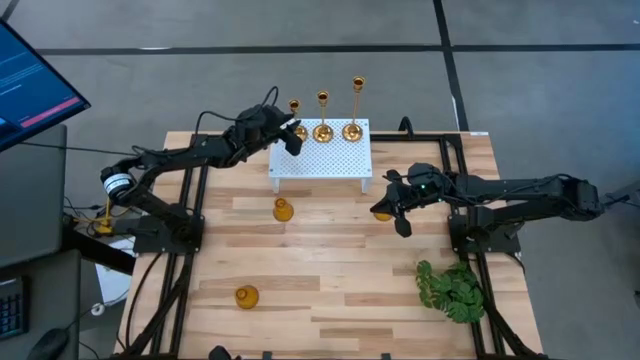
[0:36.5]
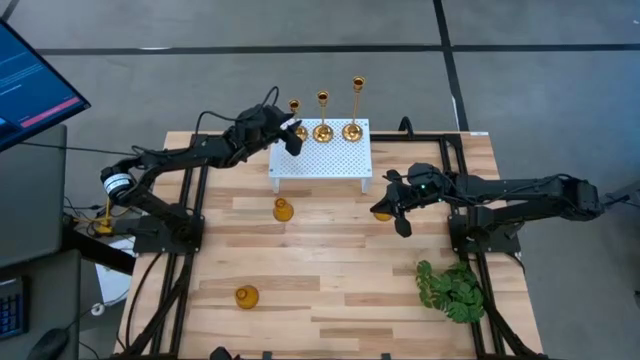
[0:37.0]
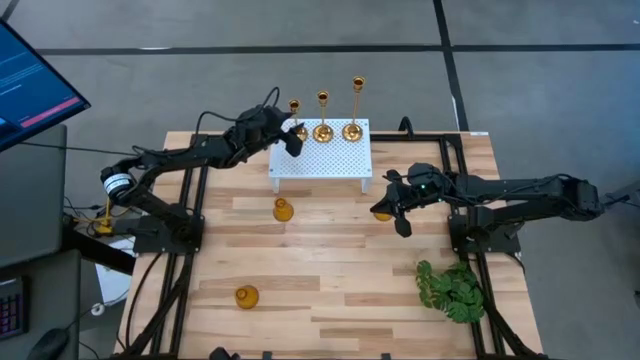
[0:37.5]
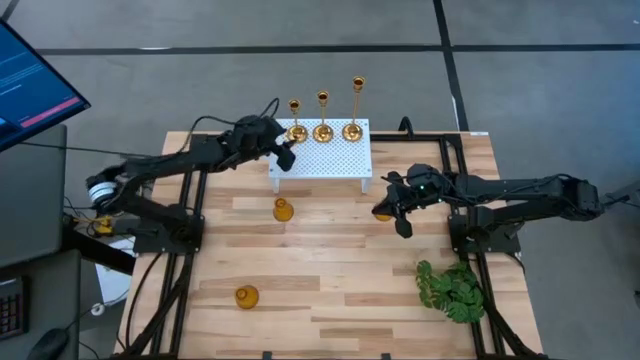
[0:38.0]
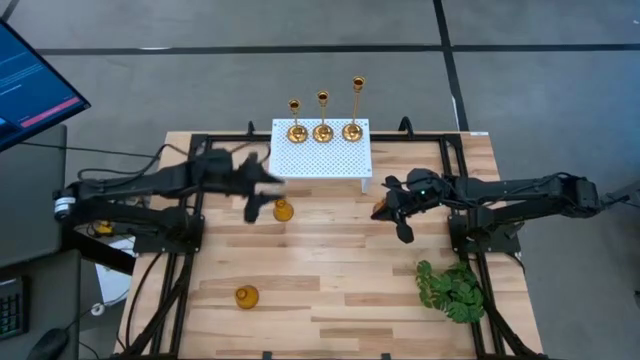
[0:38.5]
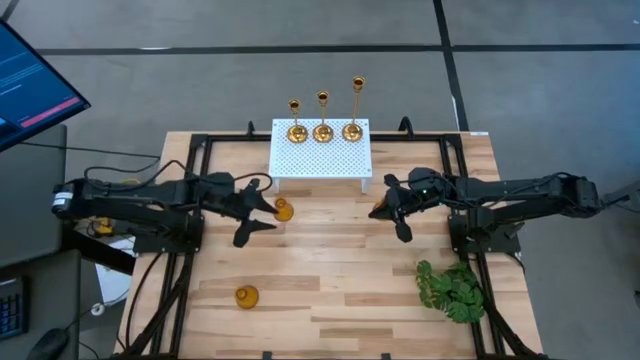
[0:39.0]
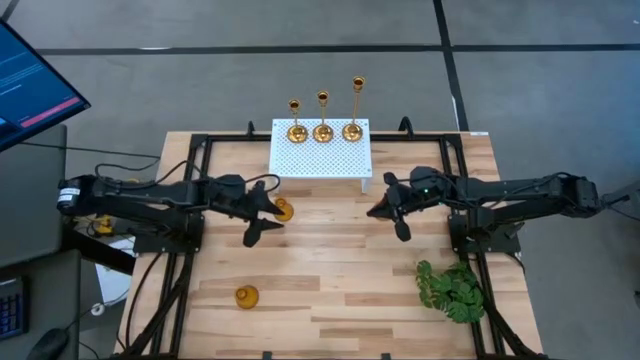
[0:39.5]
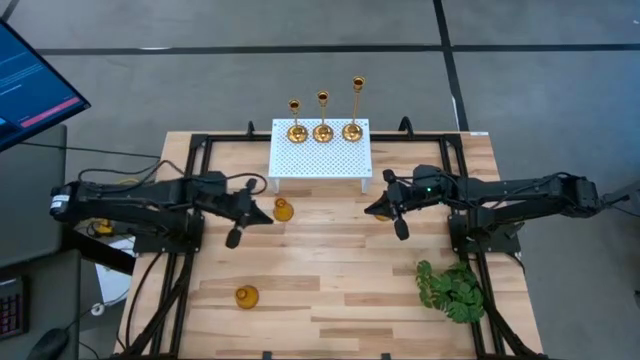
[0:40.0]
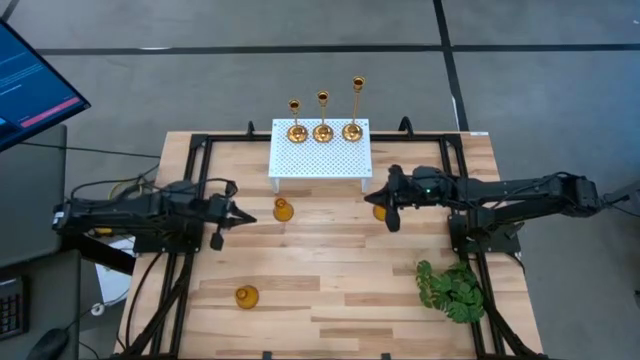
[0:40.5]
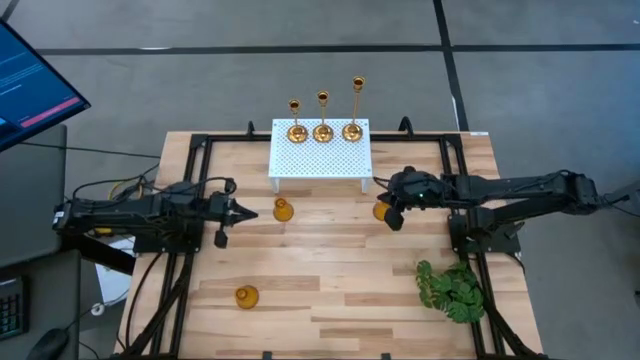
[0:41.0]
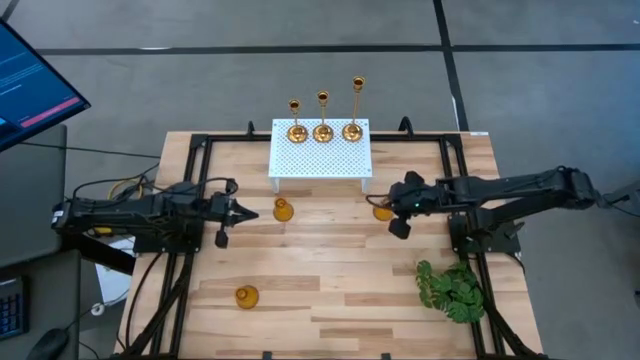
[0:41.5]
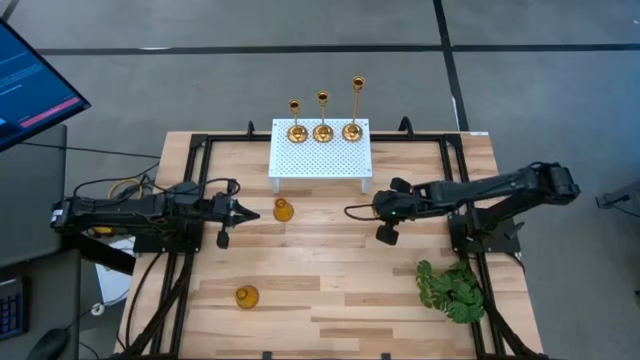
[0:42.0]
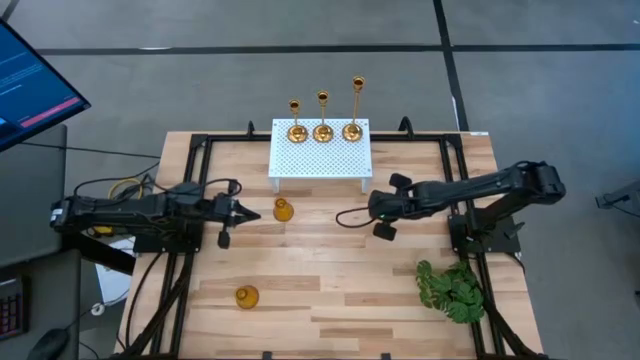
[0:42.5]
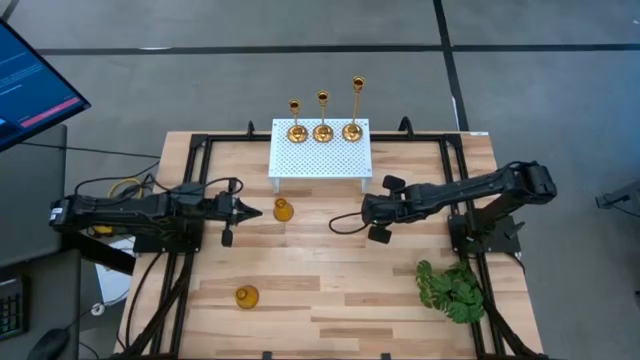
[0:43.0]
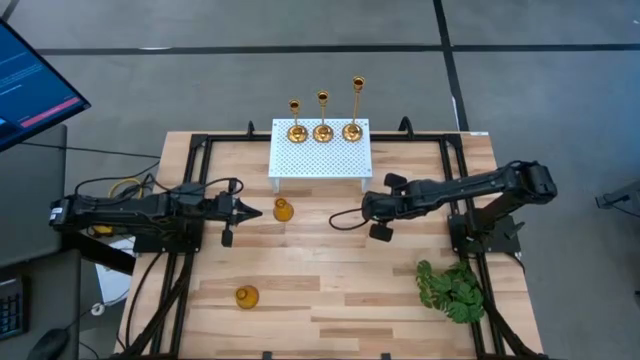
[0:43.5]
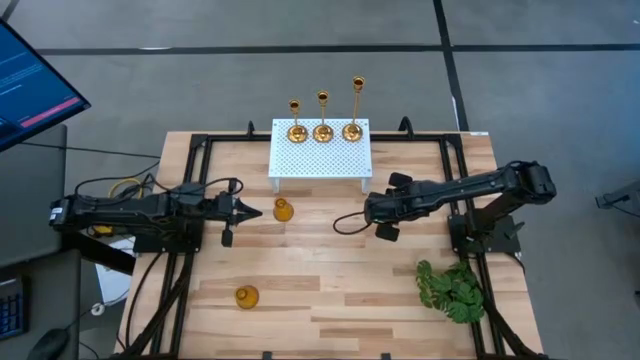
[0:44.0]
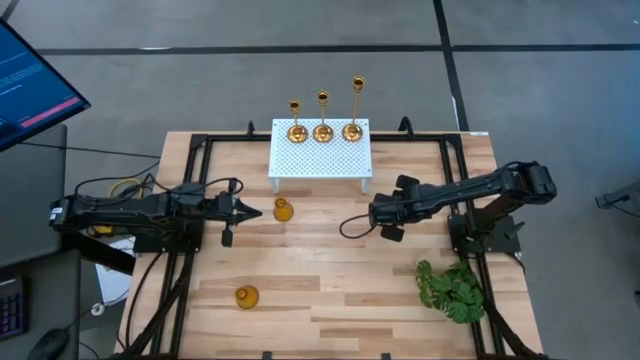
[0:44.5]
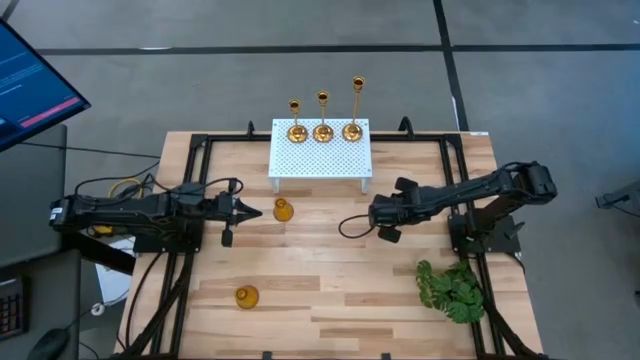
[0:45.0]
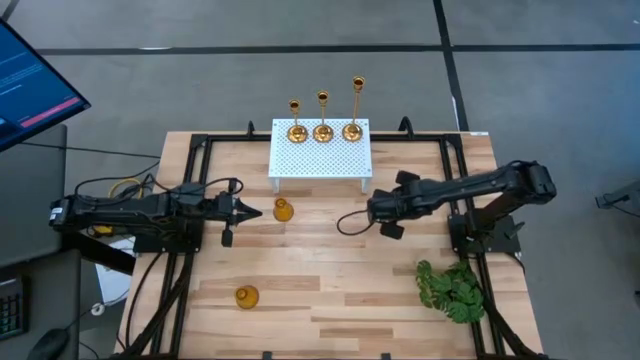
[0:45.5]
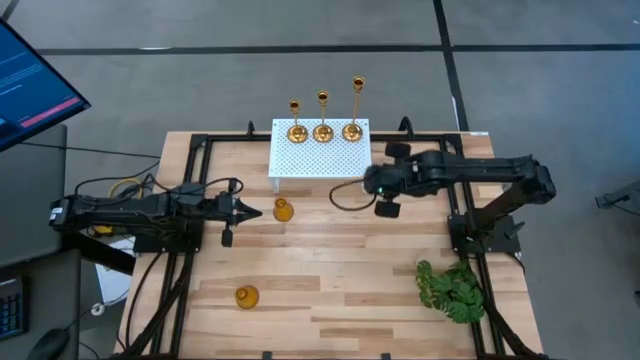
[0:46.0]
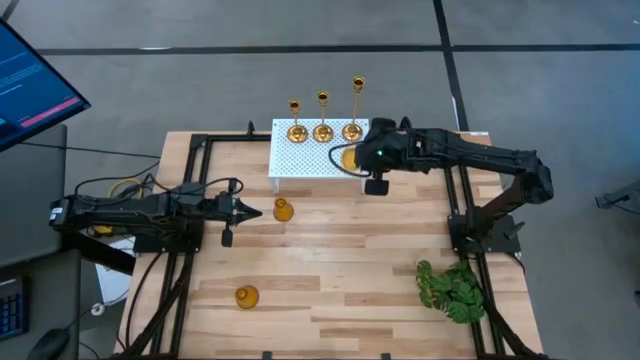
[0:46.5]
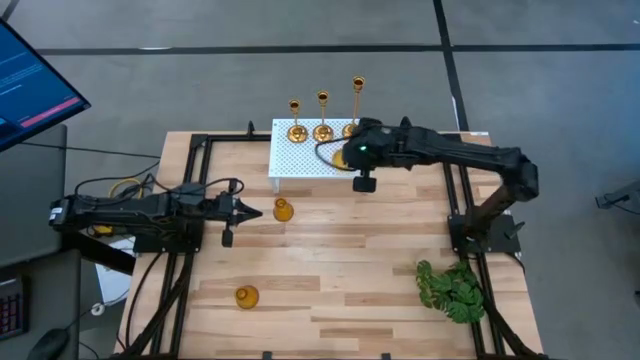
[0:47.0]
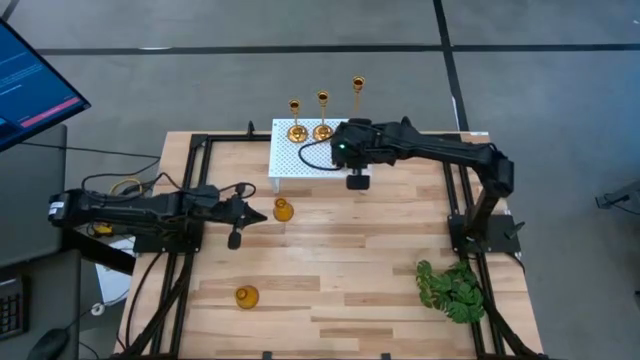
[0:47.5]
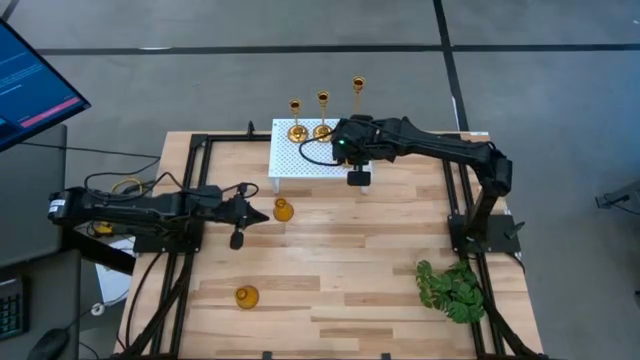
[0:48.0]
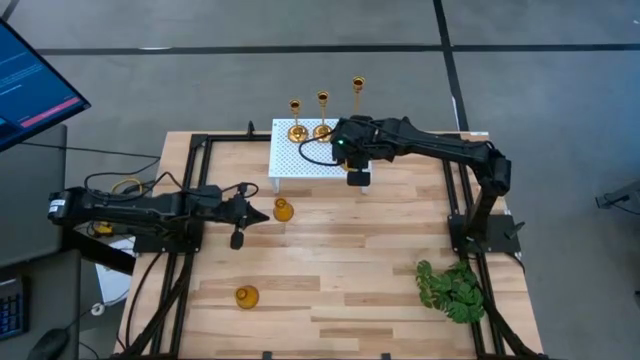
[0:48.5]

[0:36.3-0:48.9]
Task: Pick & Place candle stick holders
Put the top right orange candle holder on the shelf

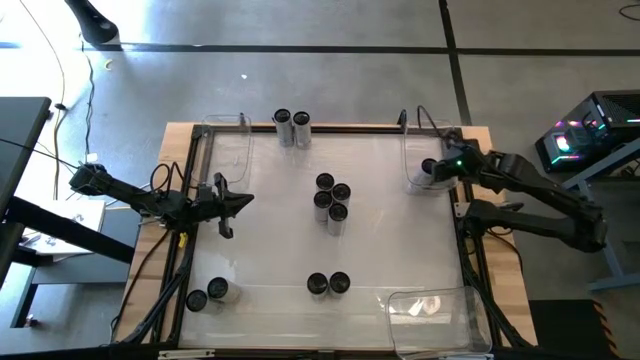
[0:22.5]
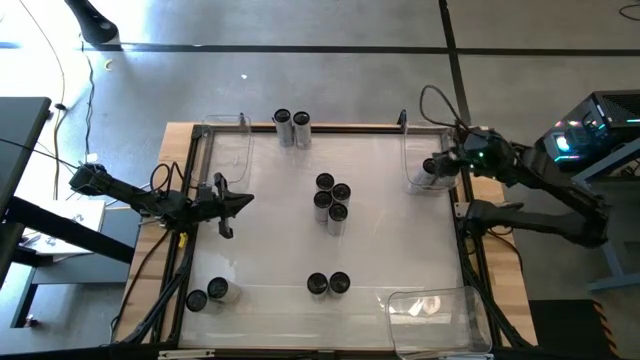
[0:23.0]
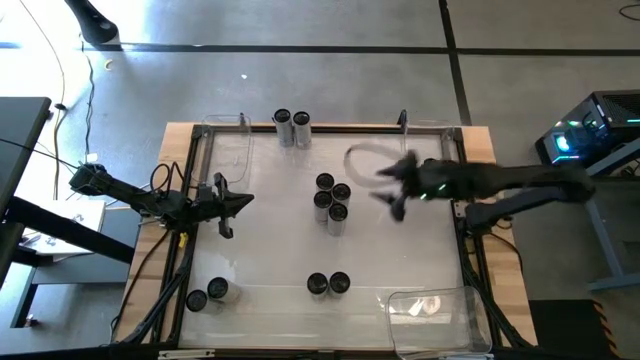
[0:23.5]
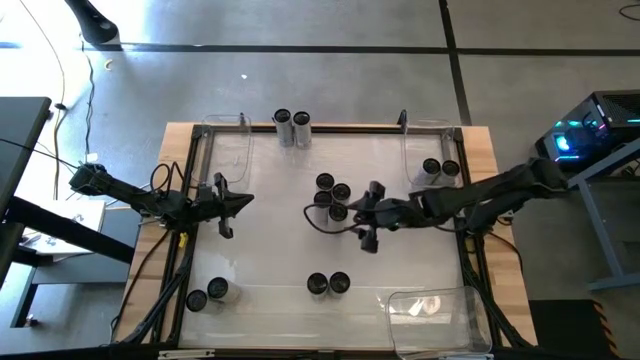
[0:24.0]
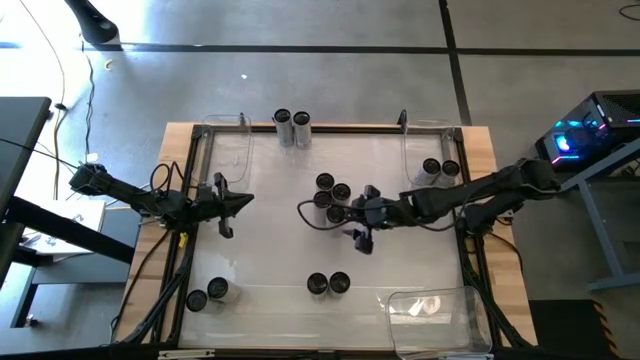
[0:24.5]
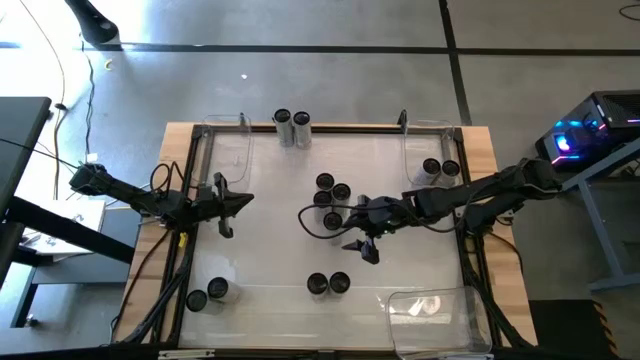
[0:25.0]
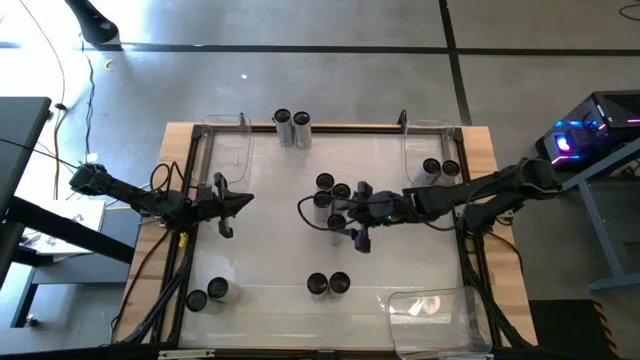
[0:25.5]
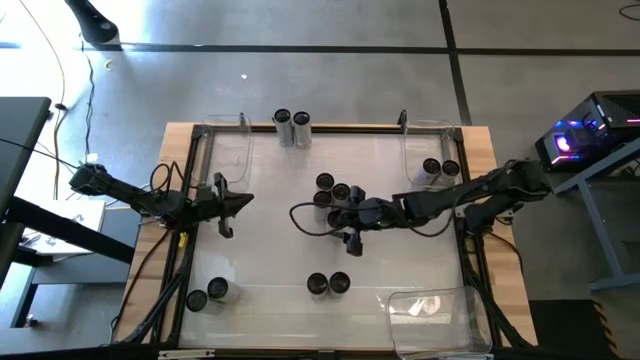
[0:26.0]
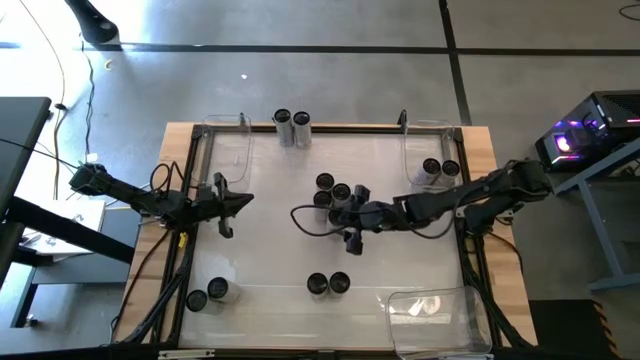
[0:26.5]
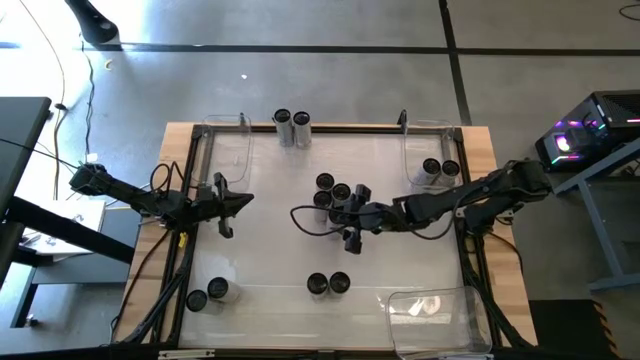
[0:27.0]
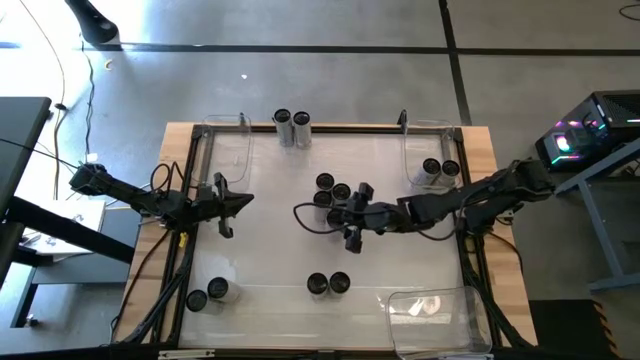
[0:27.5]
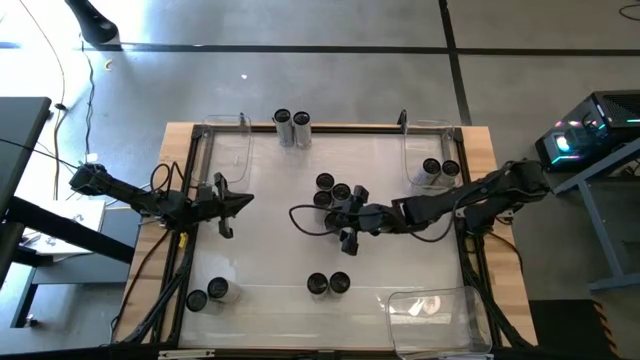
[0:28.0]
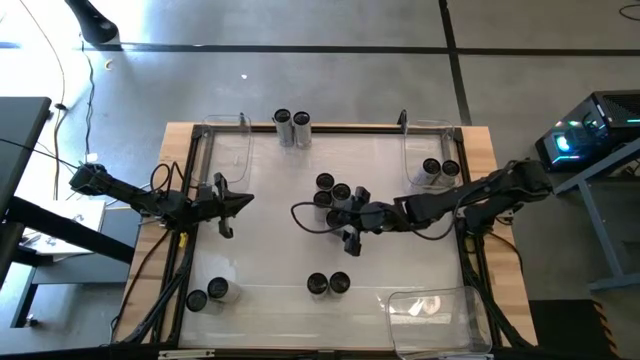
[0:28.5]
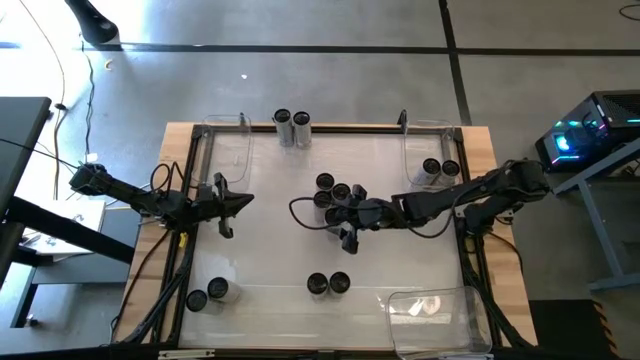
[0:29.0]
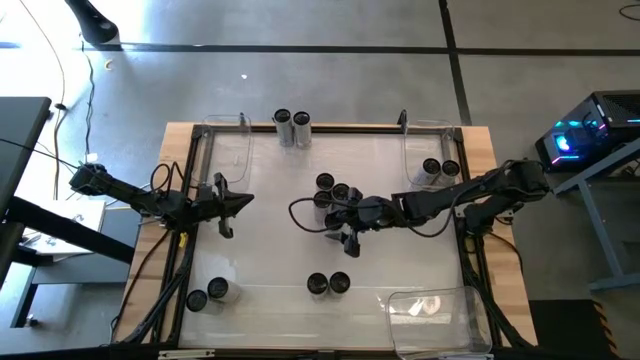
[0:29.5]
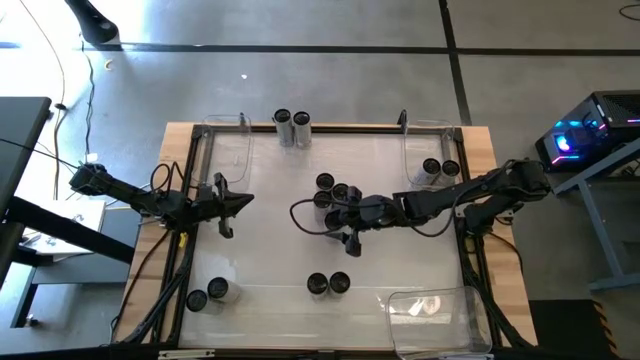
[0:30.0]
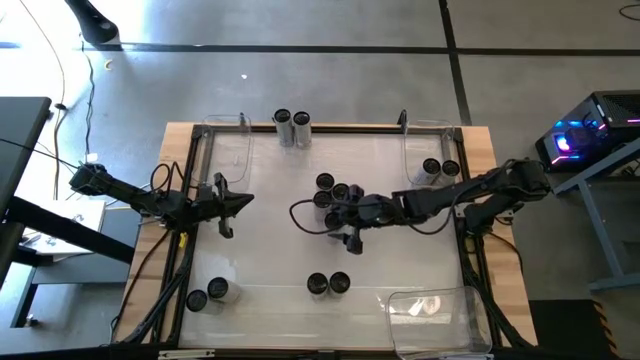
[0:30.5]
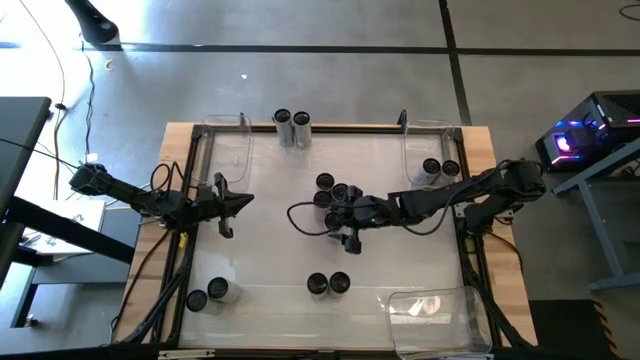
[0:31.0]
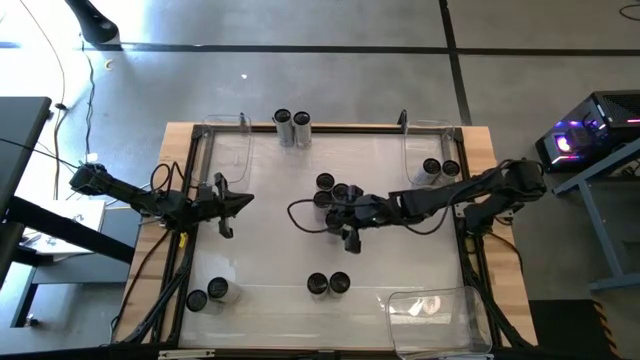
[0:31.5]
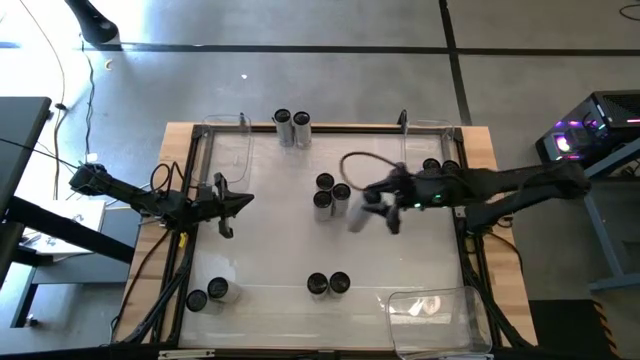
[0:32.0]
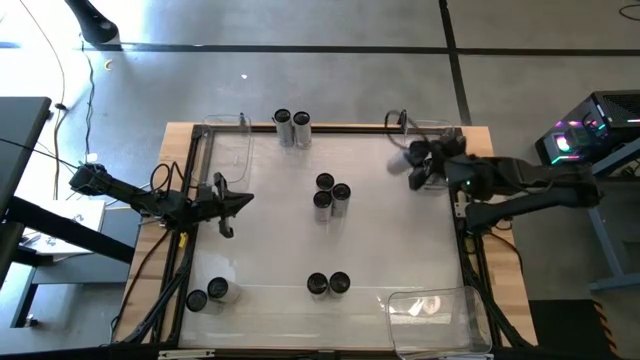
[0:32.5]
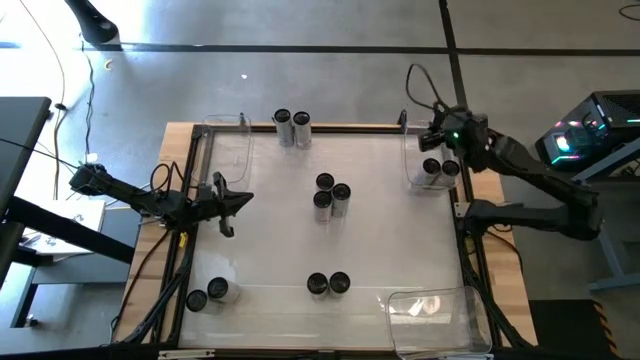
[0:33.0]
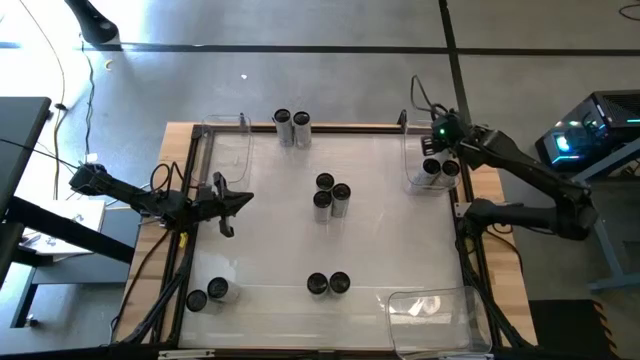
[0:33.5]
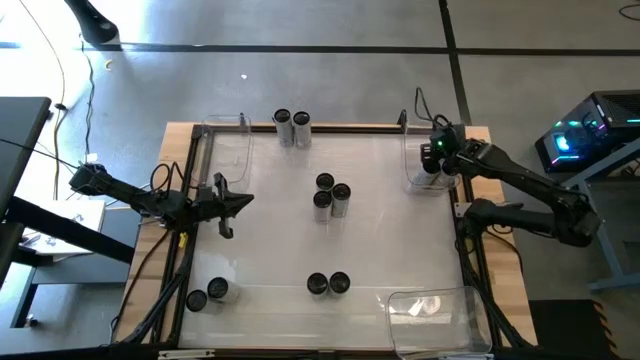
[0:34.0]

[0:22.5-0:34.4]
Task: Sort soda cans
Put the yellow soda can into the top right transparent bin
